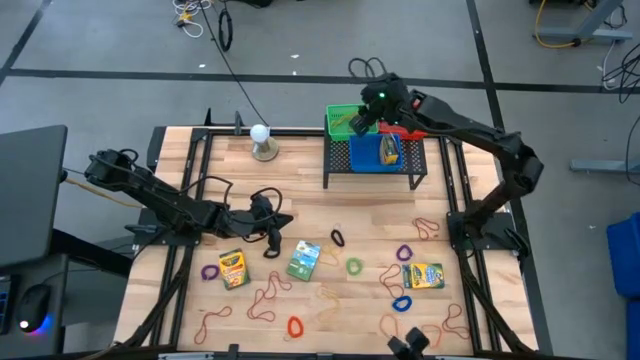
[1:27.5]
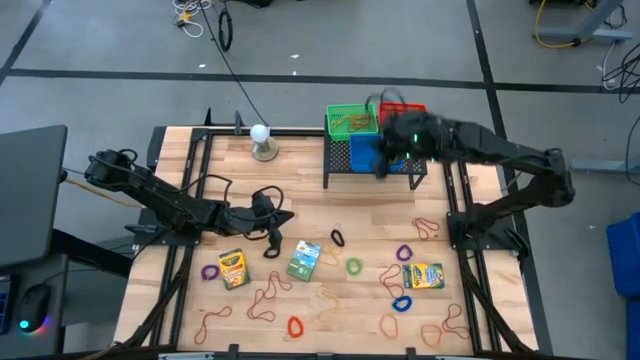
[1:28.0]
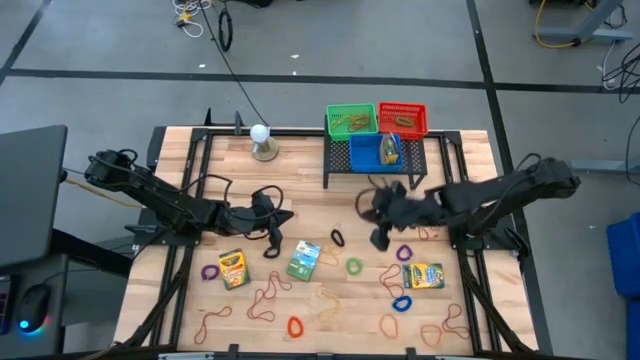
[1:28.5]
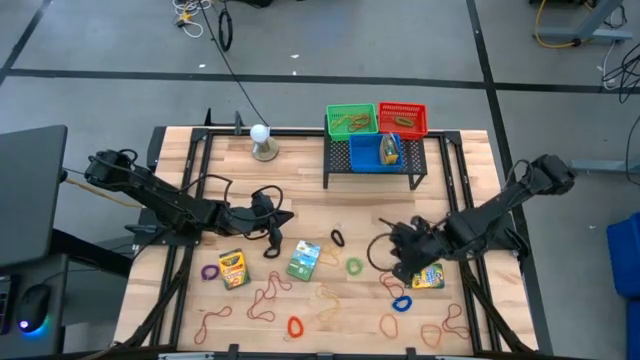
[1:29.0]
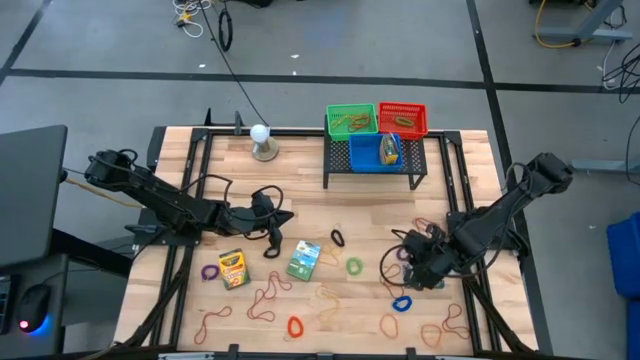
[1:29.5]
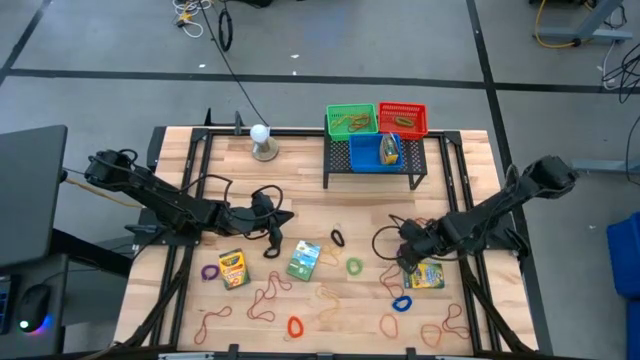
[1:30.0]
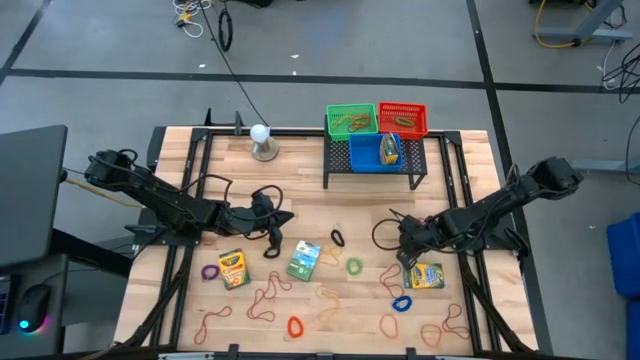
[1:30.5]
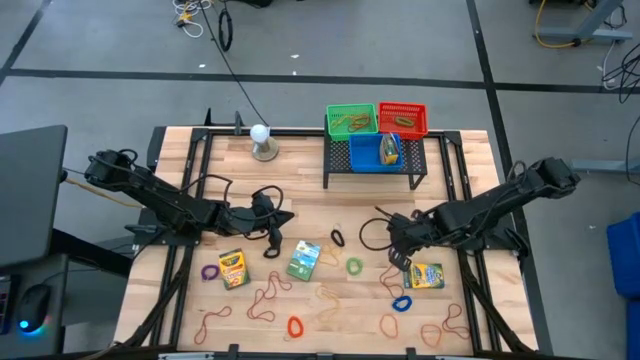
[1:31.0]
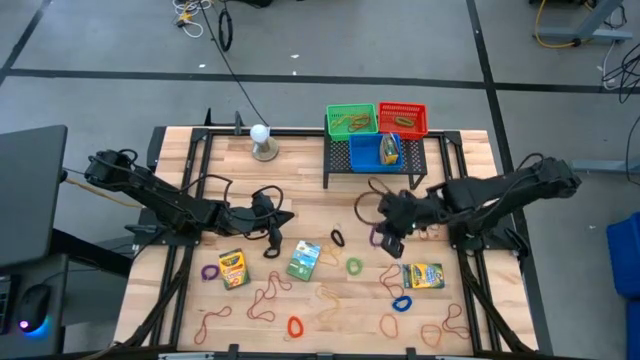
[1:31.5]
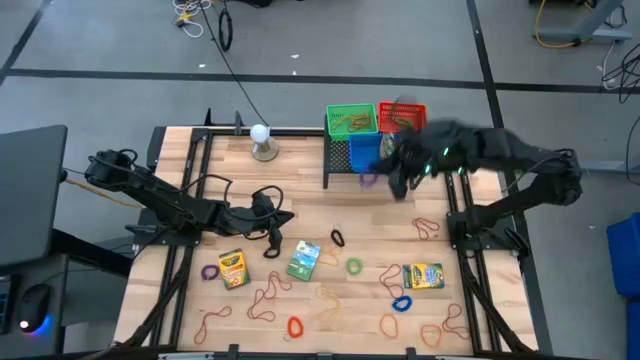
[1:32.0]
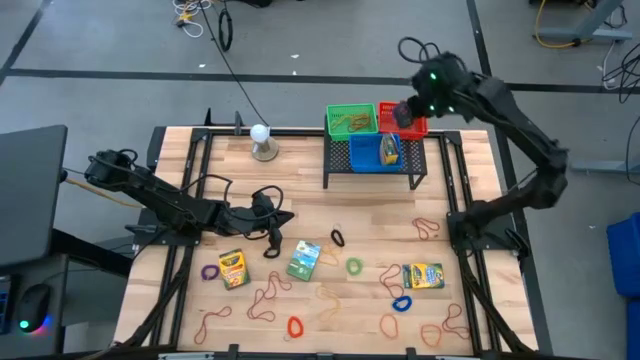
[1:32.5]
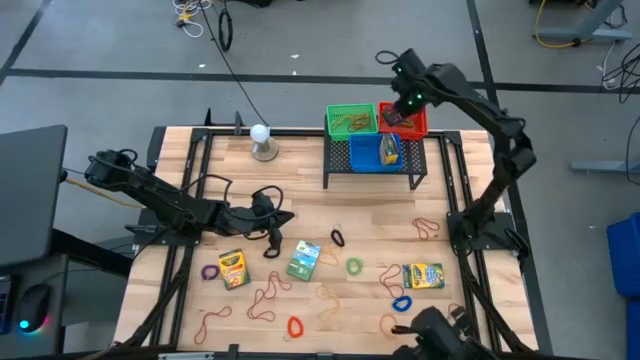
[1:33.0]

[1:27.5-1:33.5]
Task: Pick & Place Office Desk Supplies
Put the purple spiral keychain into the red bin

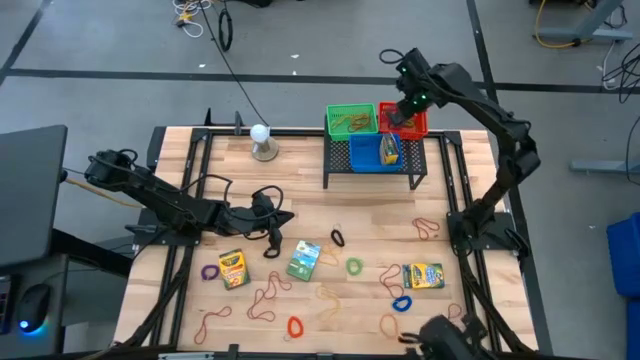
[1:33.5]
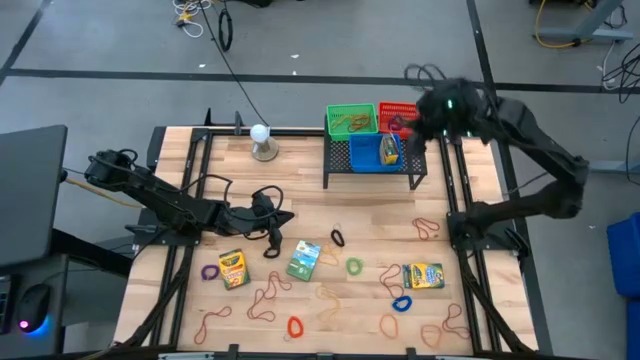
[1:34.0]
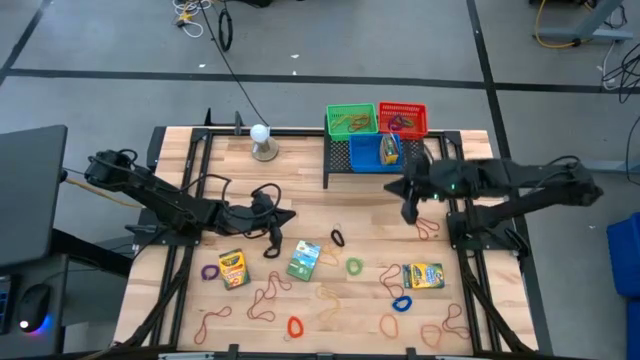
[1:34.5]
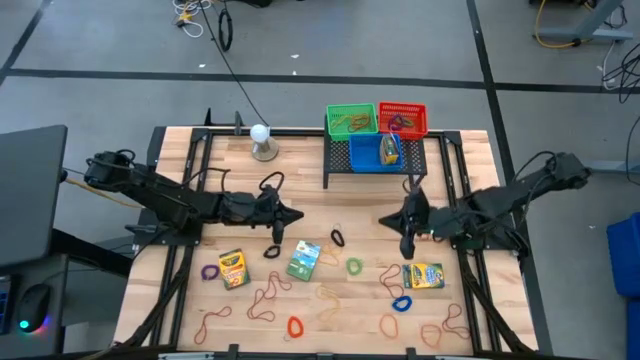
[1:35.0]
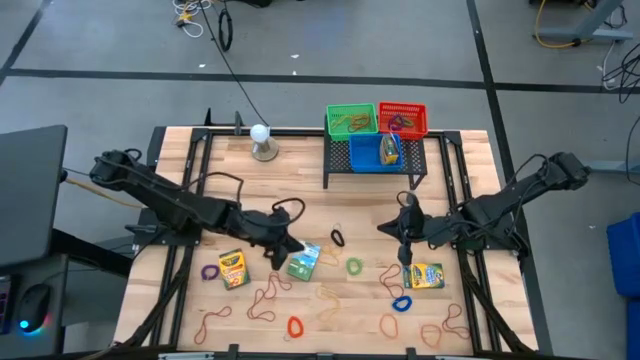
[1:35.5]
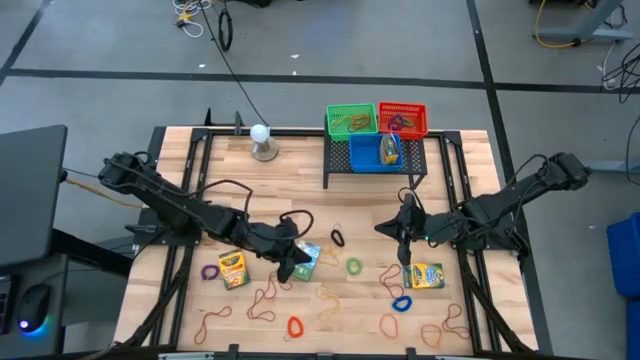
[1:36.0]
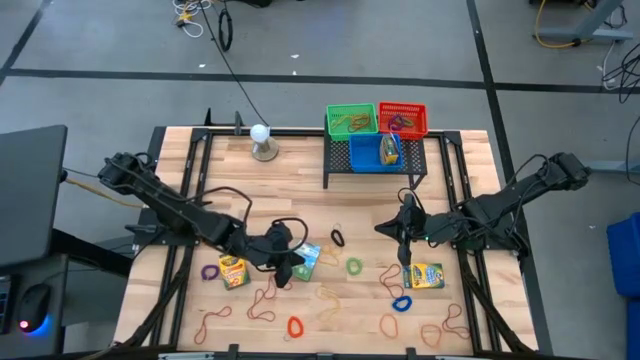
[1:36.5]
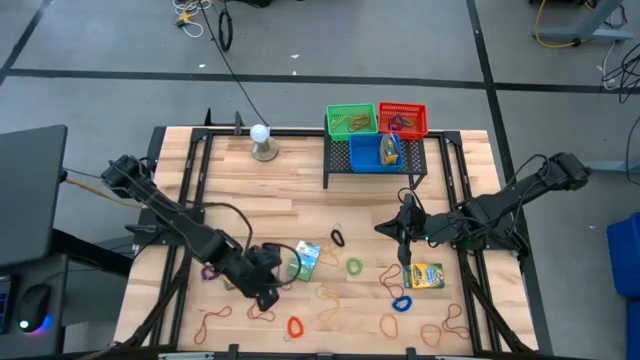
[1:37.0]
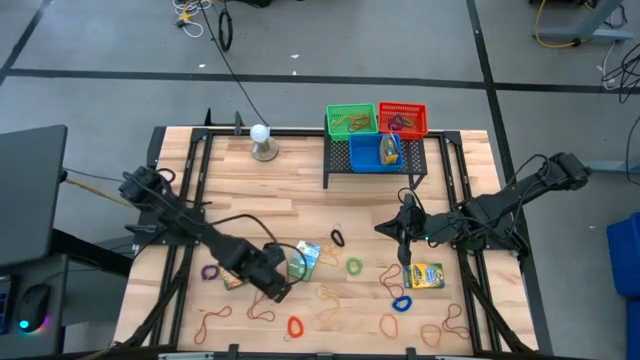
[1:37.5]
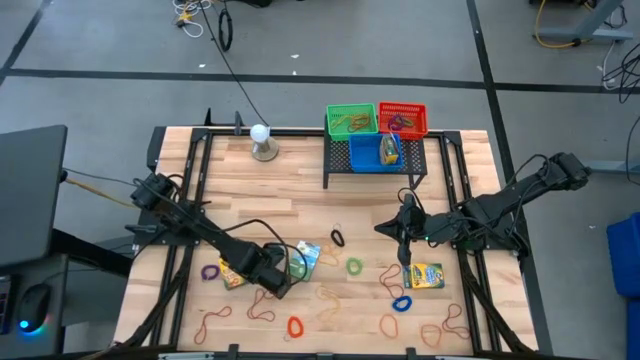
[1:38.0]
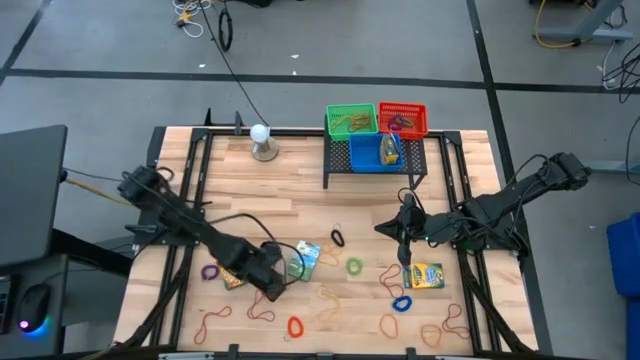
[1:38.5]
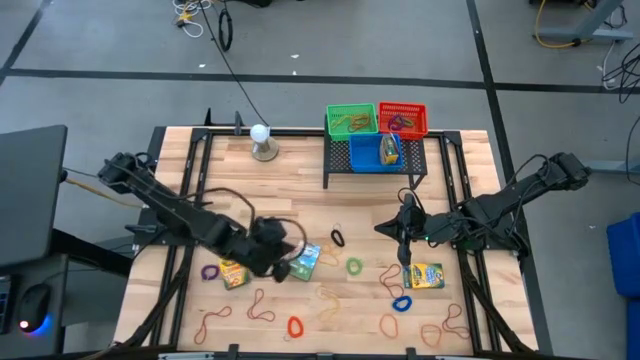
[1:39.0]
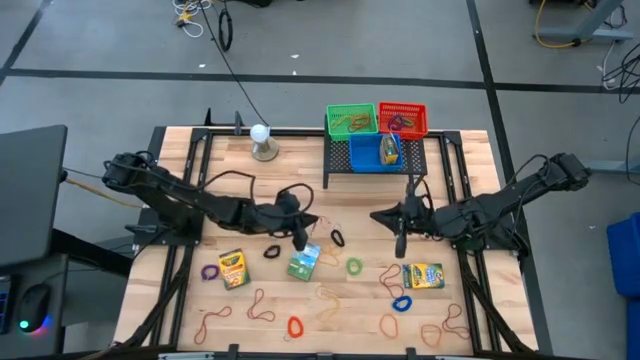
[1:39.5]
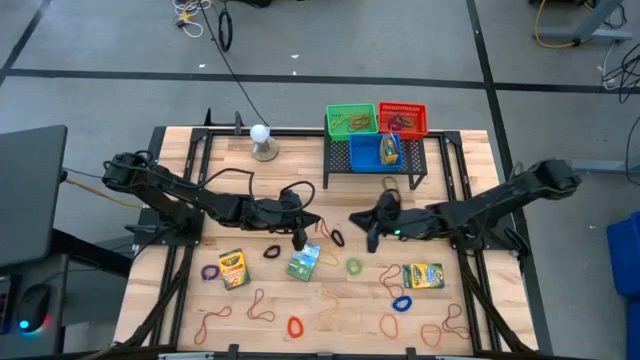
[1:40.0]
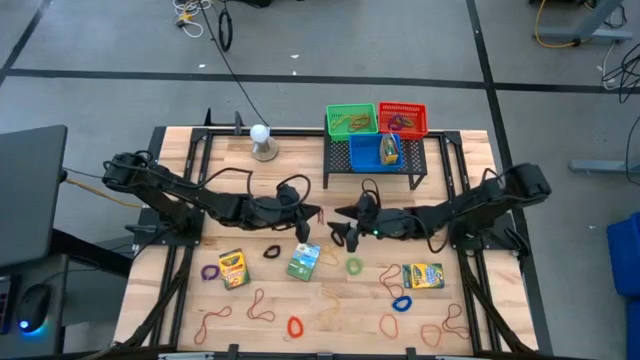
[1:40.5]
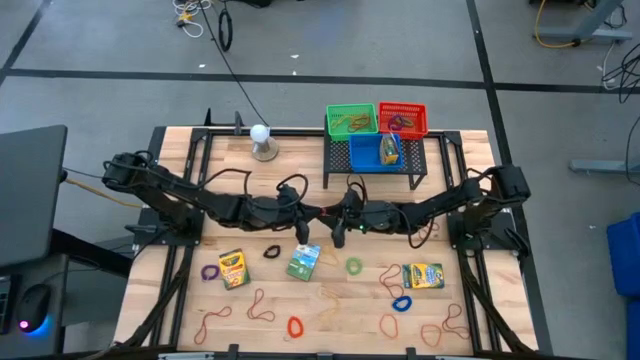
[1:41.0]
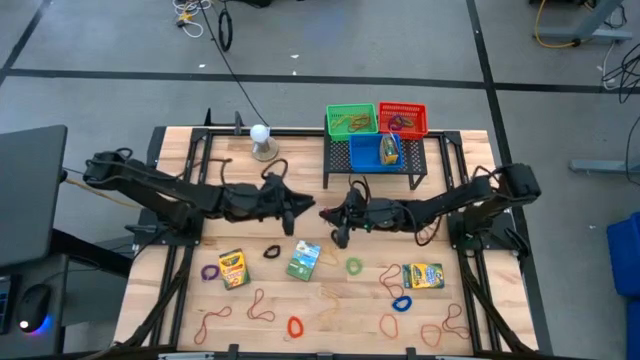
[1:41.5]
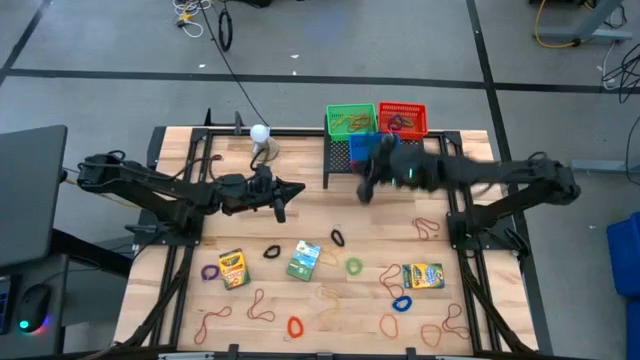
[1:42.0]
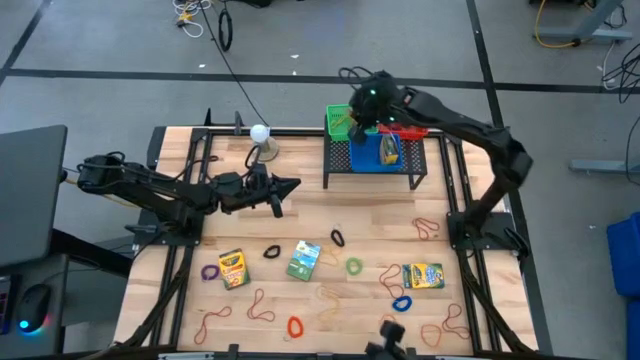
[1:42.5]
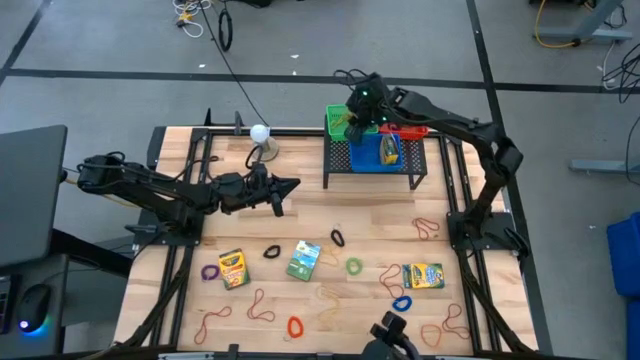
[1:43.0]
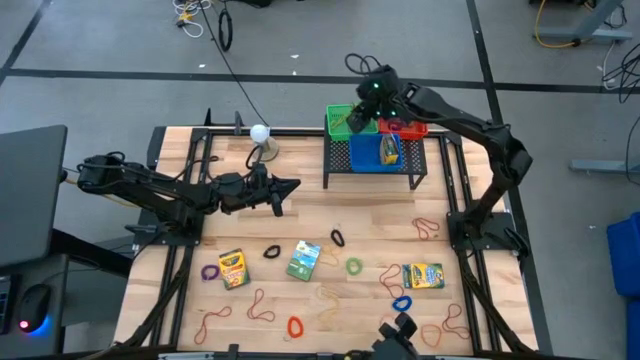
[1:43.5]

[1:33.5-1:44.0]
Put the red rubber band into the green bin

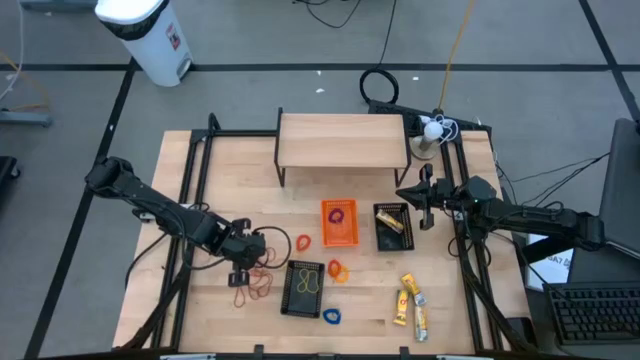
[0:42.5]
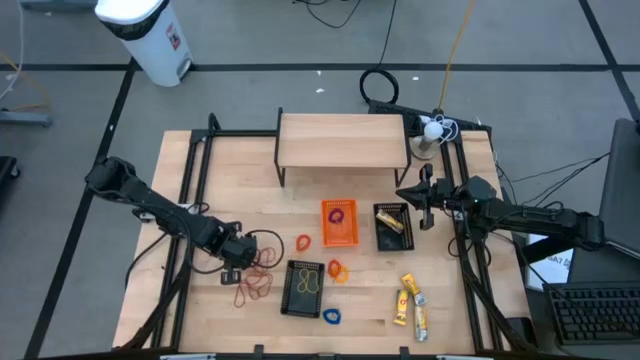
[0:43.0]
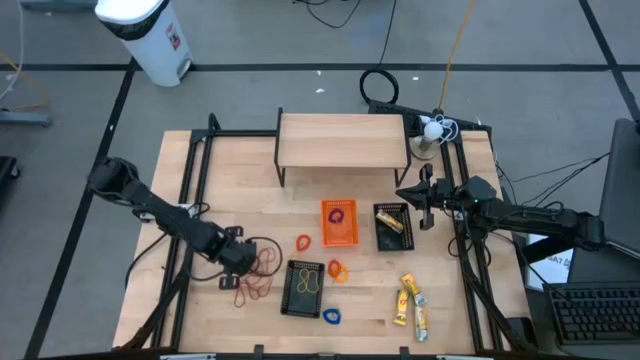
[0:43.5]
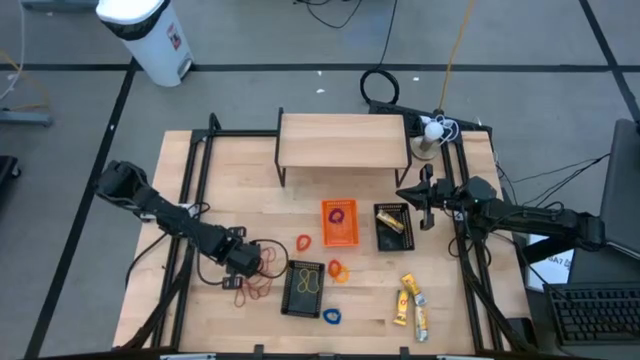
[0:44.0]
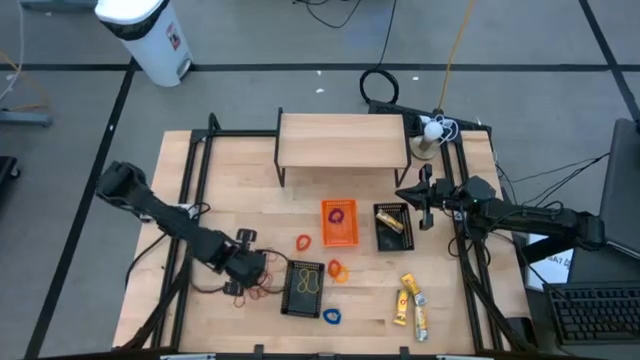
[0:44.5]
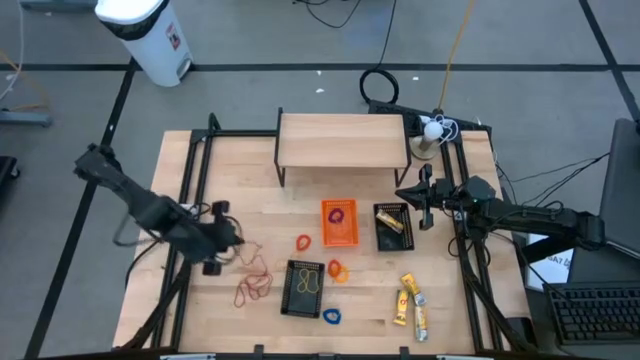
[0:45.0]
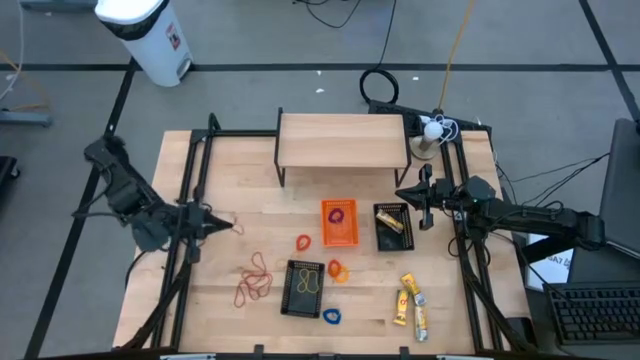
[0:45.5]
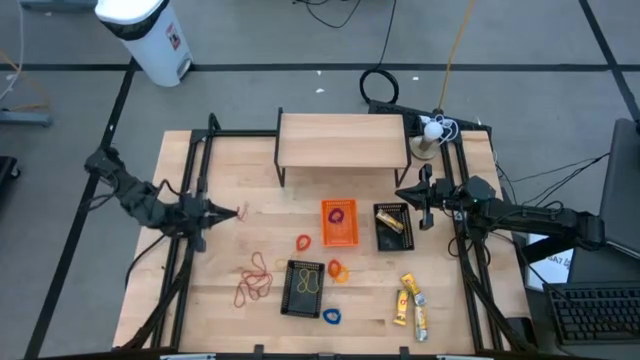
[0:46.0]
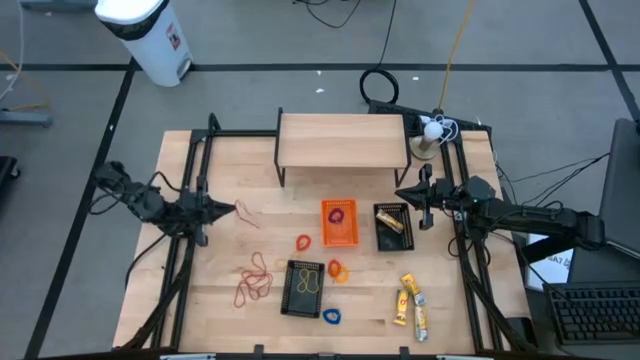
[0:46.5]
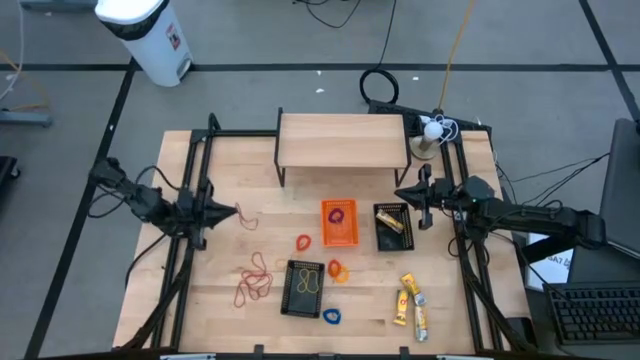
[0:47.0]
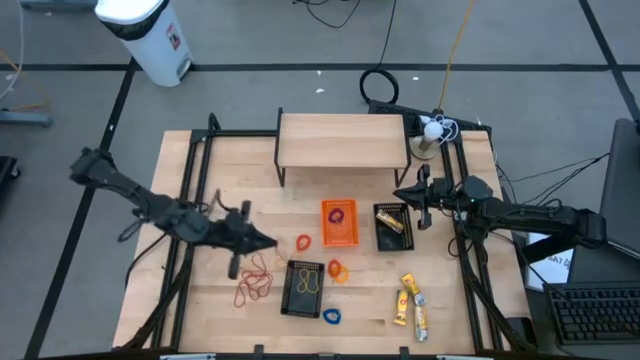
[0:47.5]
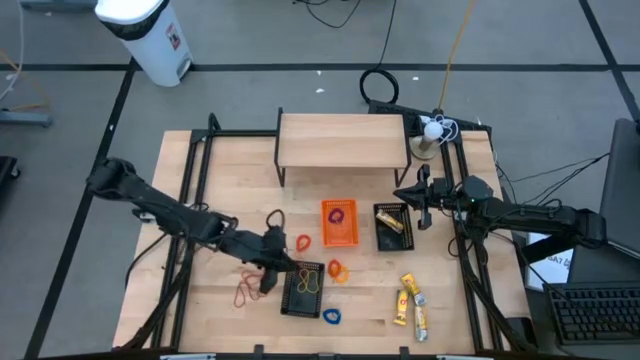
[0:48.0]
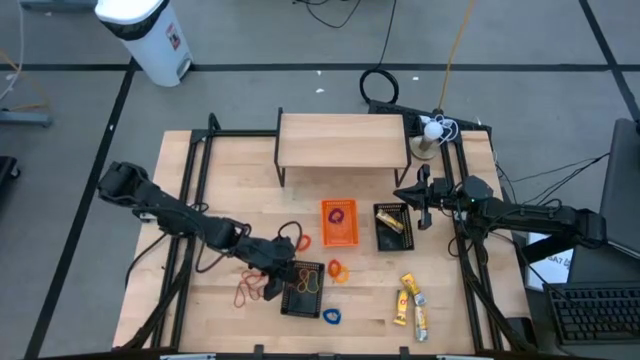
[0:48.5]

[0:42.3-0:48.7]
Task: Pick & Place Office Desk Supplies
Put the red rubber band into the bottom black bin
